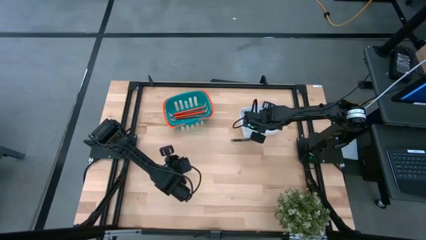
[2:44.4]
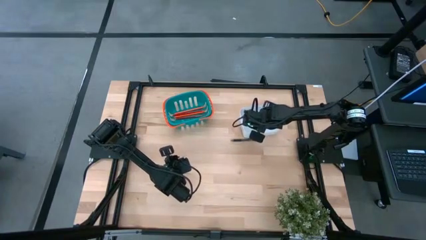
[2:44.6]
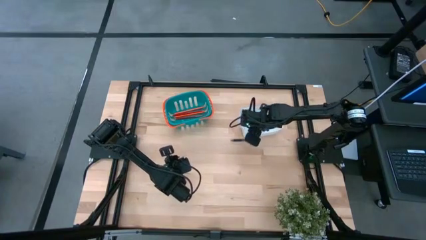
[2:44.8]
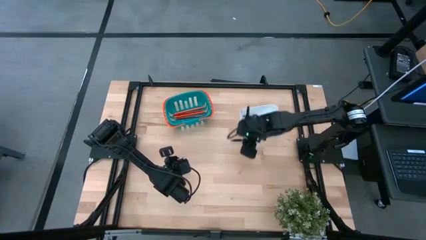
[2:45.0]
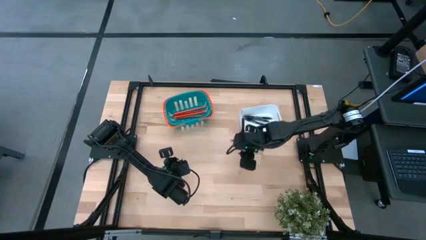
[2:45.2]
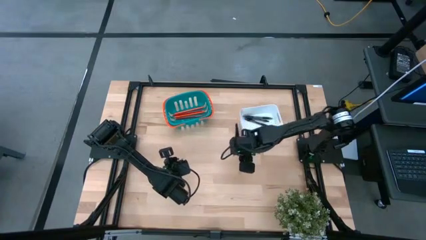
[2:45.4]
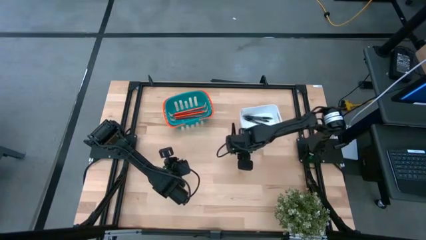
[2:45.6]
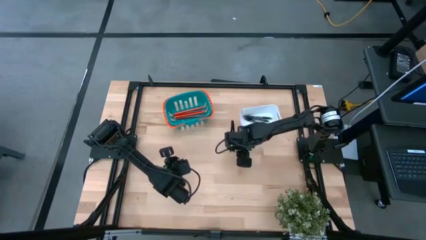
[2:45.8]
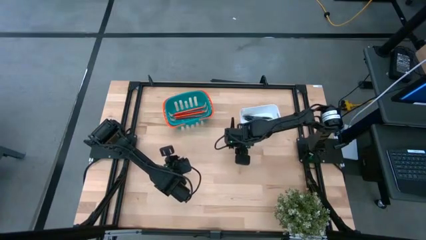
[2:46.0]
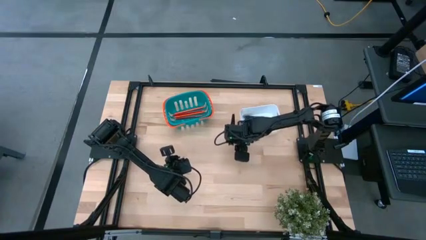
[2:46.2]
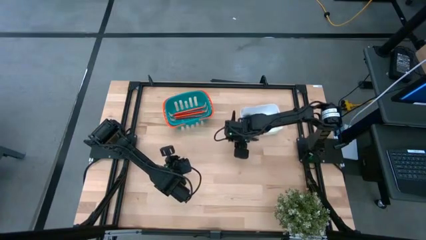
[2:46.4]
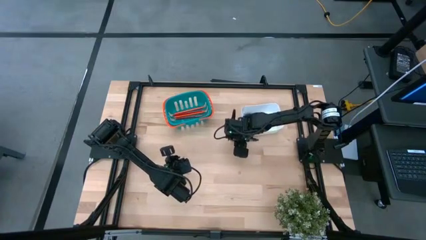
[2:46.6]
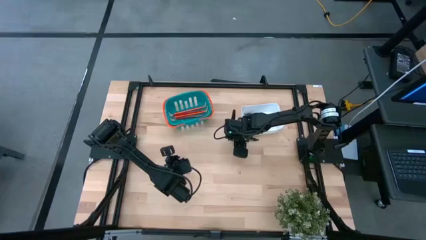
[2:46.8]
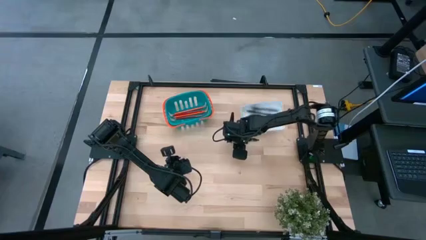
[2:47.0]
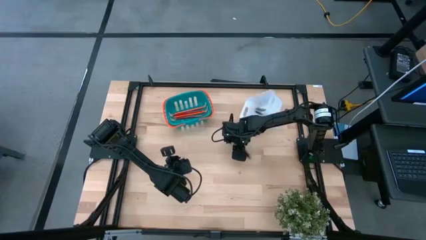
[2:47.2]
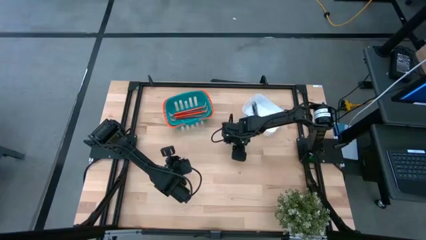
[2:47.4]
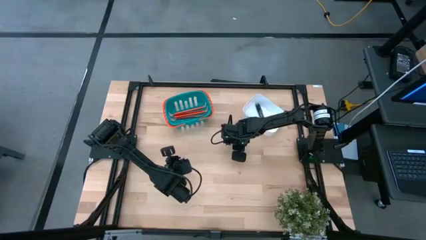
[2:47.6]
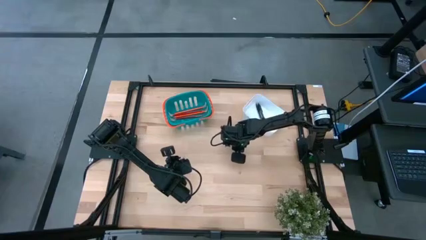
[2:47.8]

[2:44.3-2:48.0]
Task: Sort pens & pencils
Put the black pen into the white bin

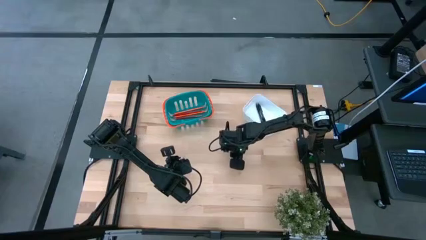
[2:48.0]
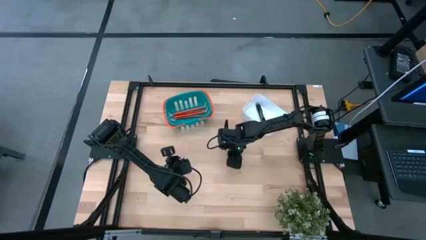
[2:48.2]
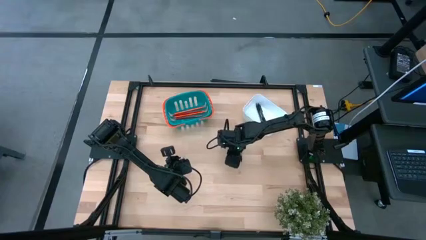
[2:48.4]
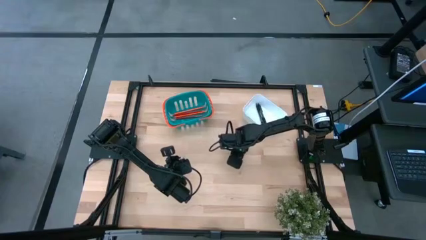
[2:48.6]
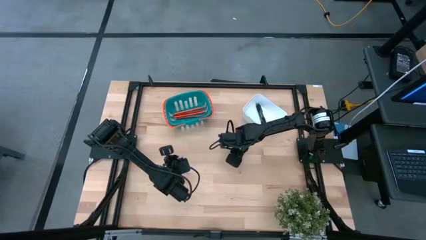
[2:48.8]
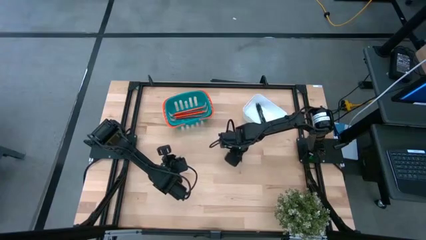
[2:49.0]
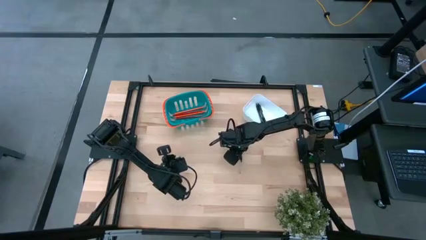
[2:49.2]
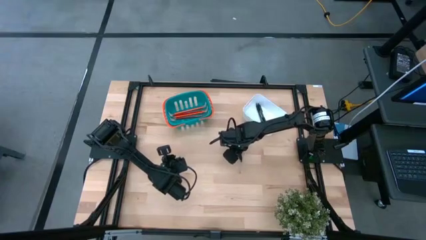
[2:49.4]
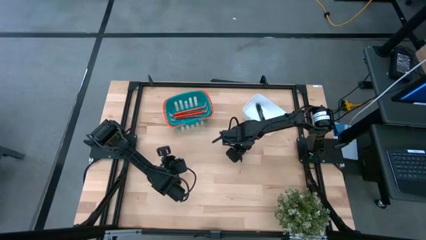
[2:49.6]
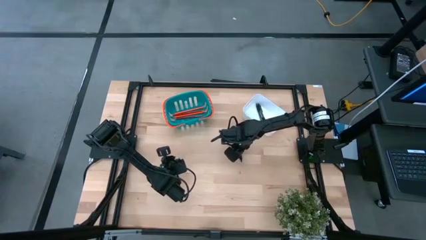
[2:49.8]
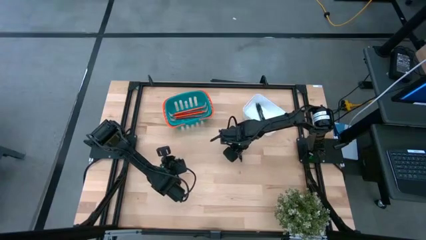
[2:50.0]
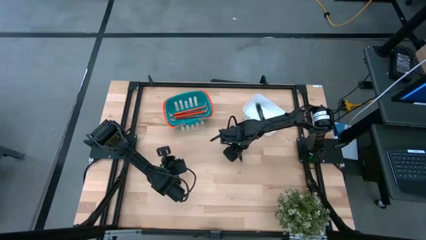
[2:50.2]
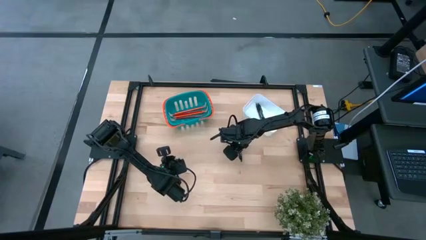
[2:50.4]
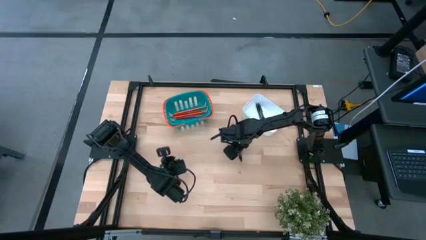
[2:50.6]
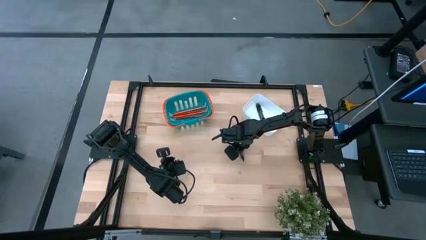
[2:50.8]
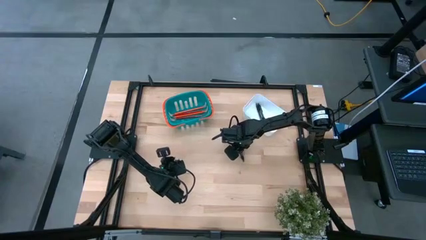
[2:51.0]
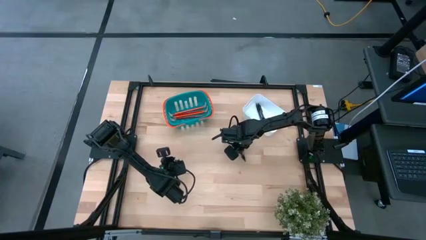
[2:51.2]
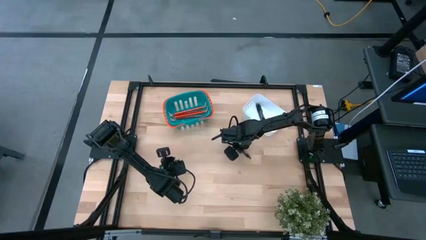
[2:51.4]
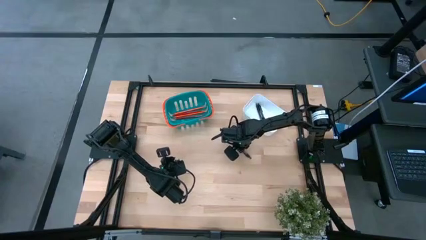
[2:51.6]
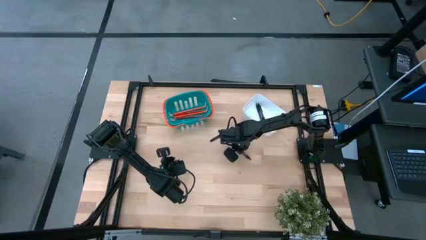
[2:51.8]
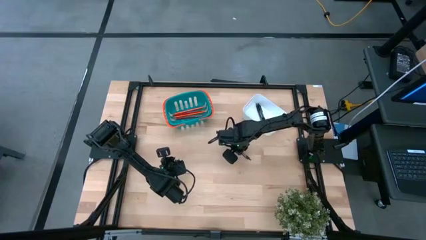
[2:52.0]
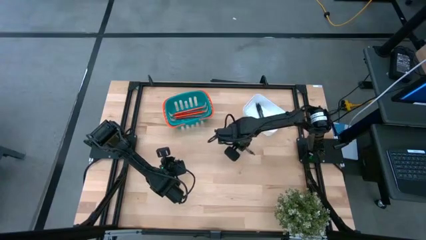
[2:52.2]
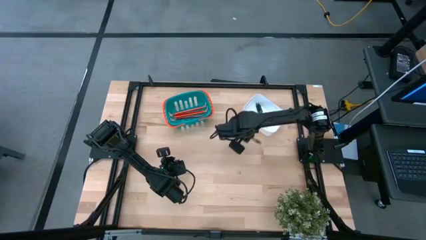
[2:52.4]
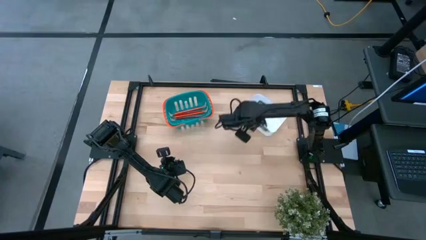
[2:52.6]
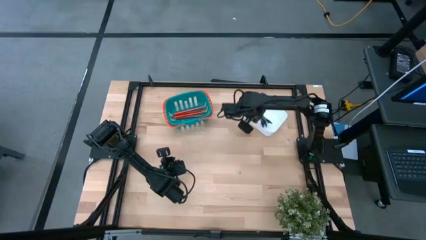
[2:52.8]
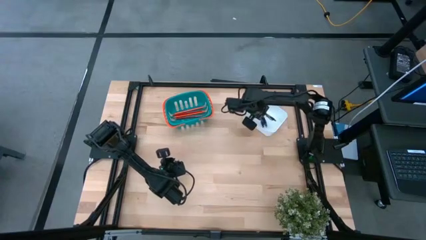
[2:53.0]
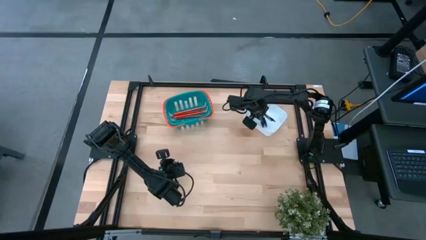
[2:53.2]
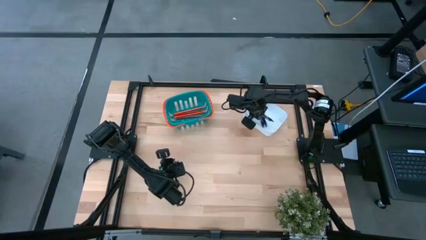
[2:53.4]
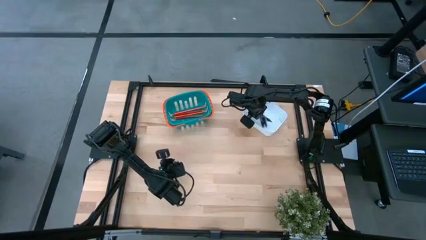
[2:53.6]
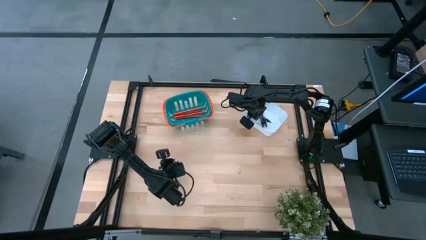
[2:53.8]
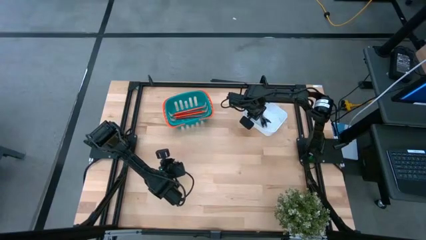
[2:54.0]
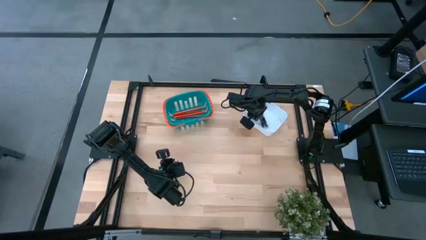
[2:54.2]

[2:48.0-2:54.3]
Put the black pen into the white bin

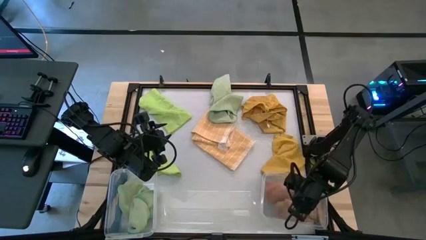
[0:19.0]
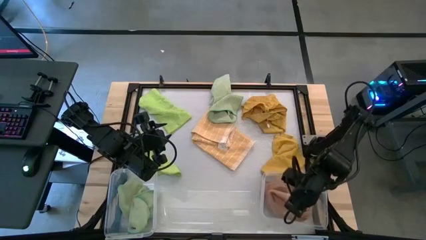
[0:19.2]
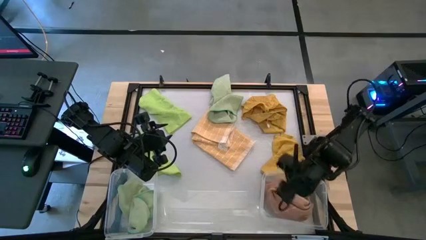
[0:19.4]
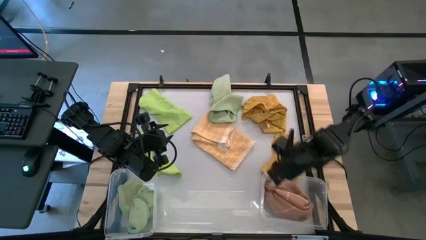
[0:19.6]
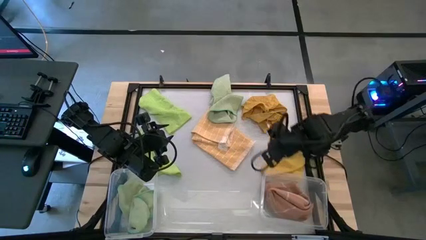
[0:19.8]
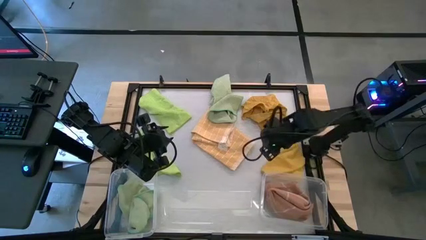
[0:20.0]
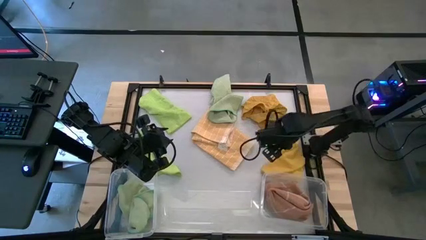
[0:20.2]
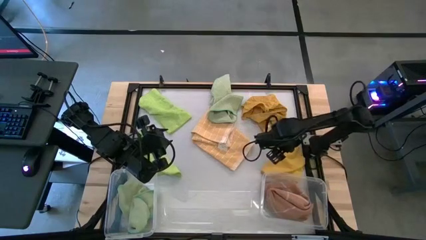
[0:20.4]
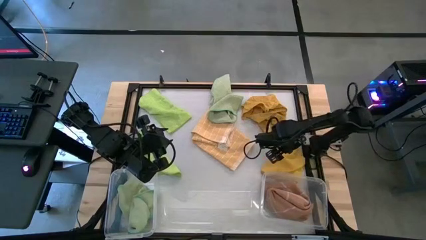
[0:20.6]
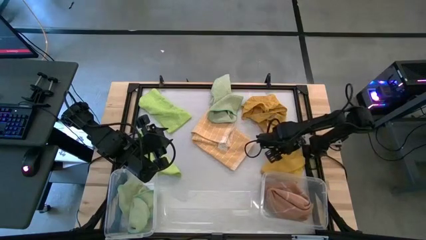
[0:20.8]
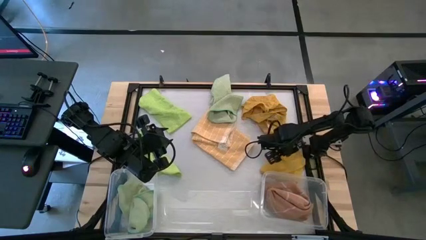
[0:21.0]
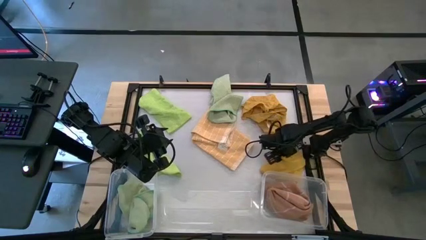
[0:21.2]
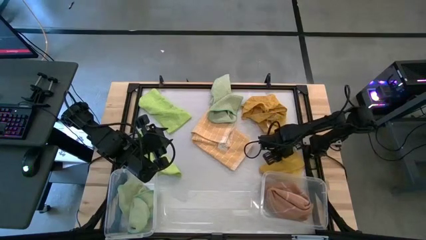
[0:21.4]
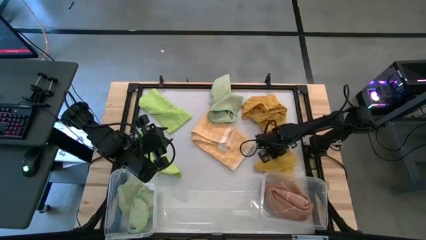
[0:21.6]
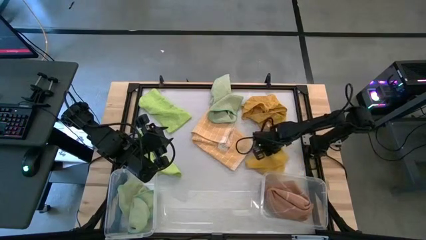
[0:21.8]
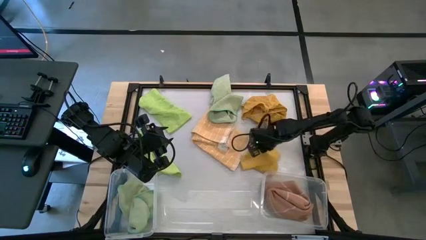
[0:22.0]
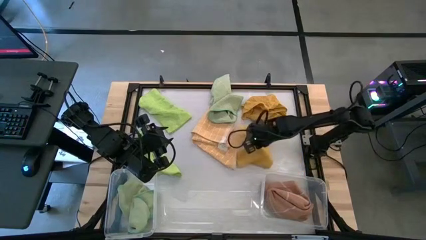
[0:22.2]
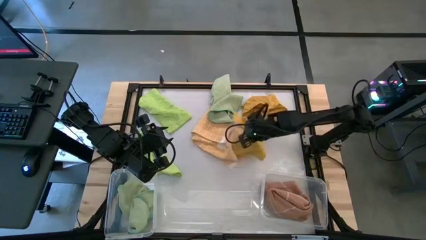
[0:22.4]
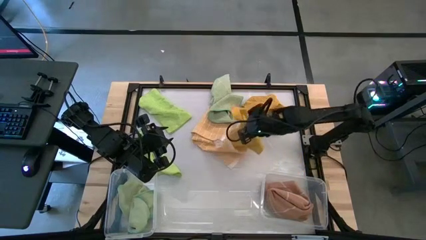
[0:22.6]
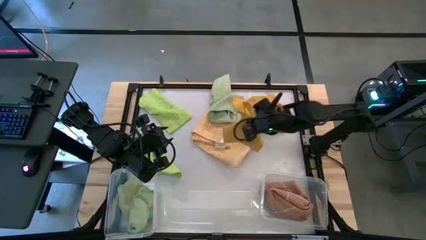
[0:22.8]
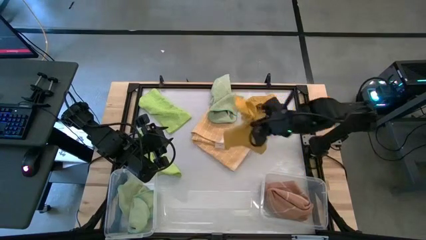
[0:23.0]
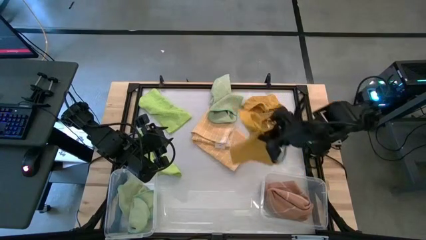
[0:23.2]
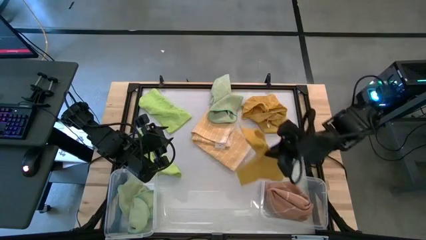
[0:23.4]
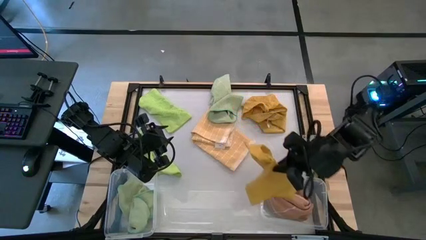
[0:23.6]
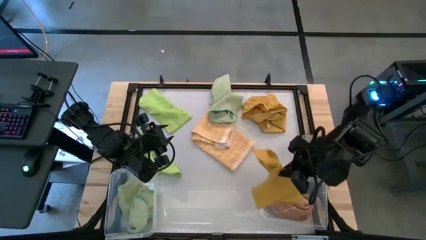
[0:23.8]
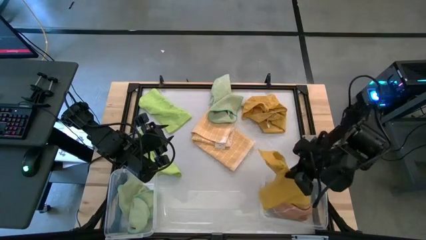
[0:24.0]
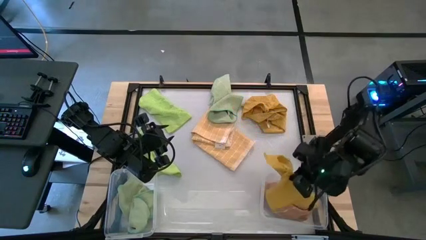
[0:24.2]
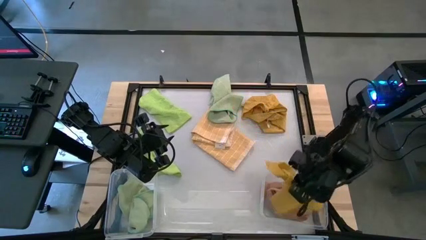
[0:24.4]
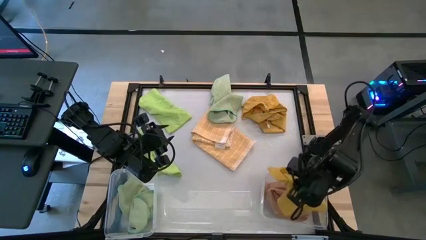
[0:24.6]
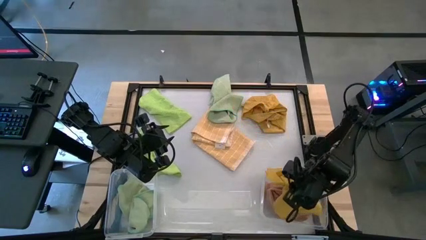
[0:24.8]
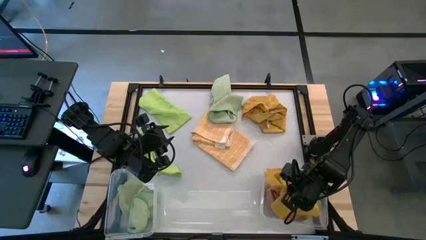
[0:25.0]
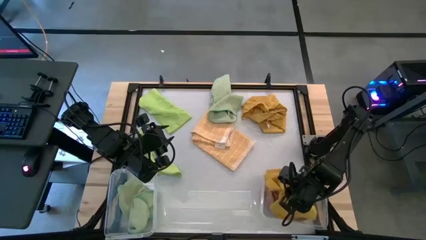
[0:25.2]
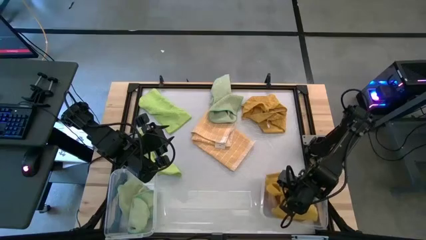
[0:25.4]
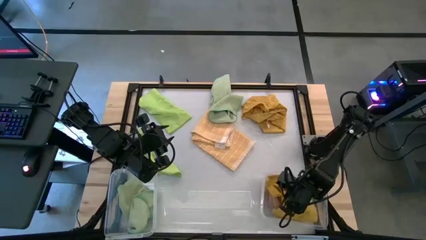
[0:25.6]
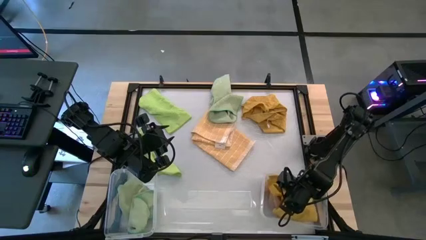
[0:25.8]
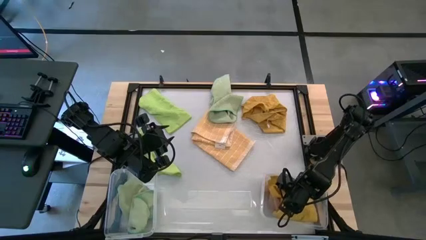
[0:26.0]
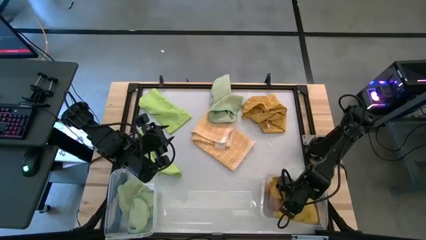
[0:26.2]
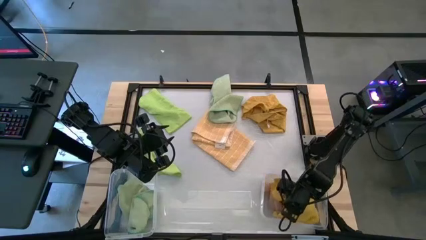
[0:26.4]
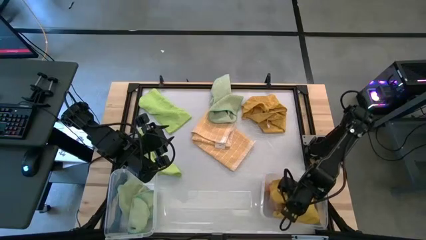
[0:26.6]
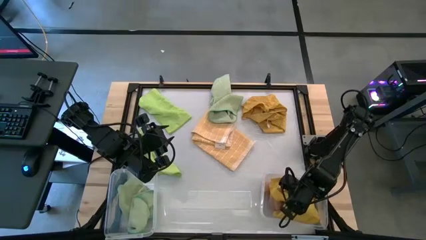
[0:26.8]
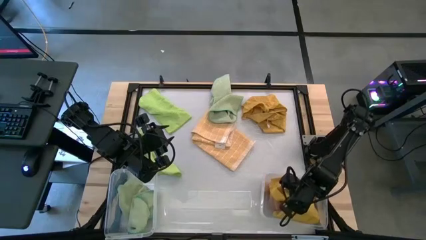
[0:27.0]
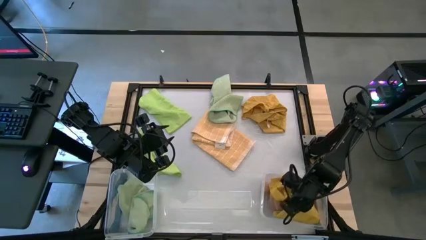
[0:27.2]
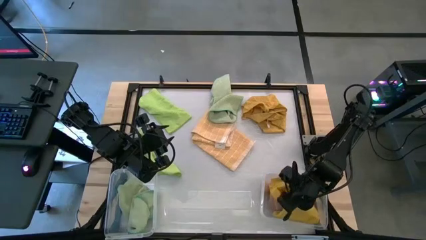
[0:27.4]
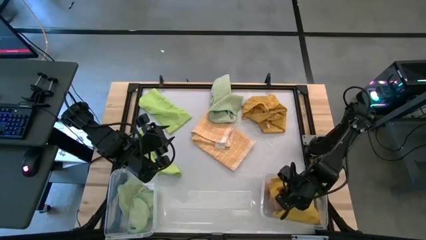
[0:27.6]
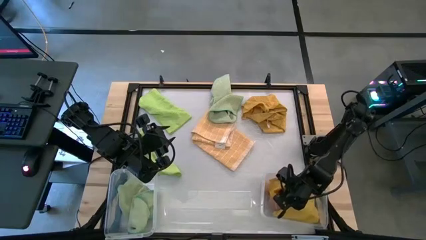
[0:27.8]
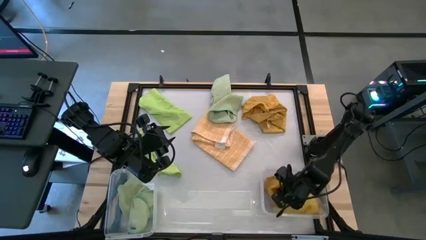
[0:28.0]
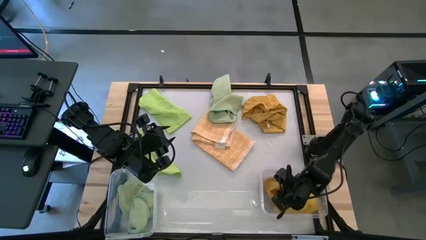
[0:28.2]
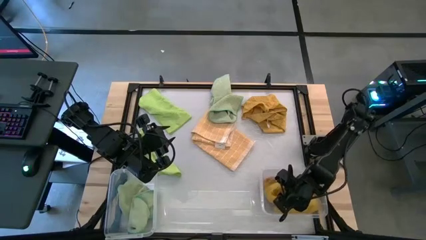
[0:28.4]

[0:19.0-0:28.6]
Task: Sort microfiber towel by color & place in baskets
Put the bottom yellow microfiber towel into the right transparent bin
